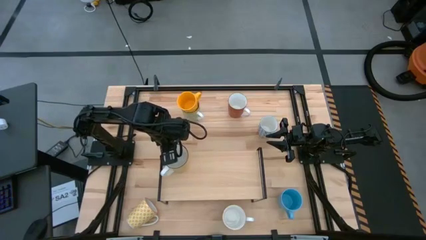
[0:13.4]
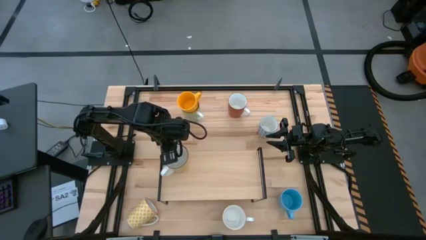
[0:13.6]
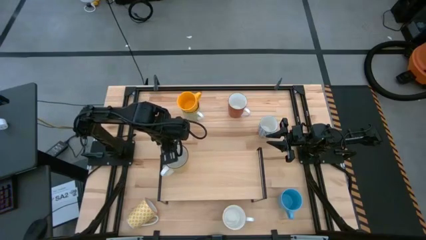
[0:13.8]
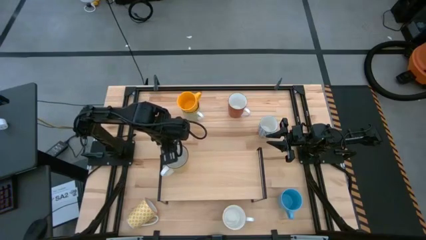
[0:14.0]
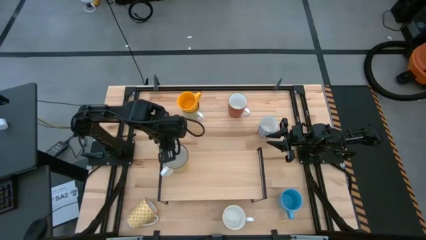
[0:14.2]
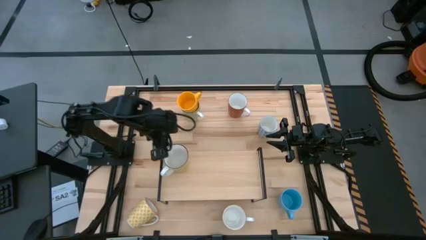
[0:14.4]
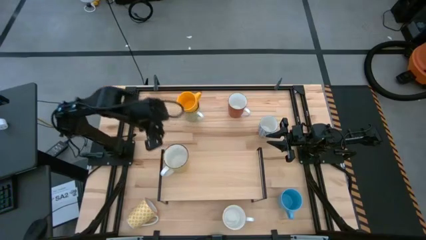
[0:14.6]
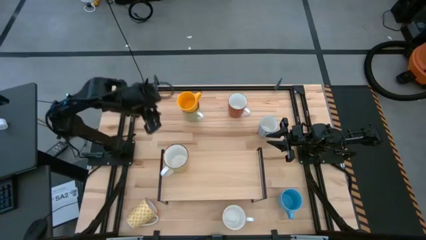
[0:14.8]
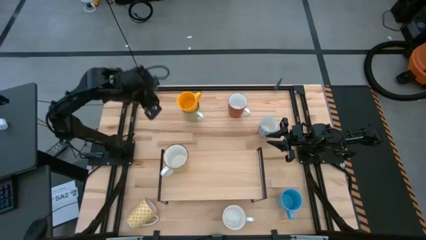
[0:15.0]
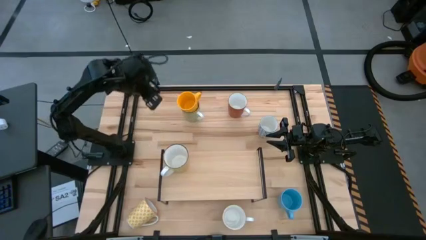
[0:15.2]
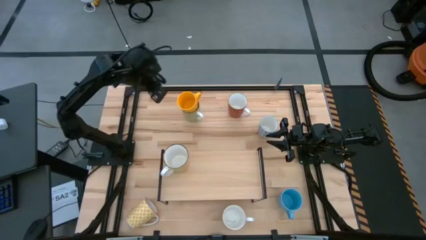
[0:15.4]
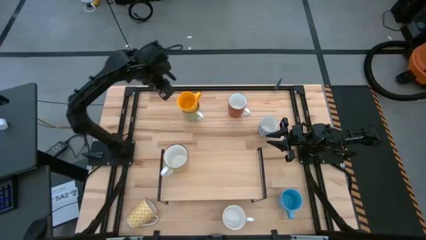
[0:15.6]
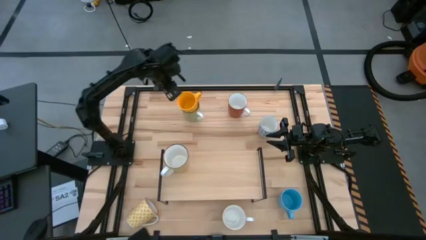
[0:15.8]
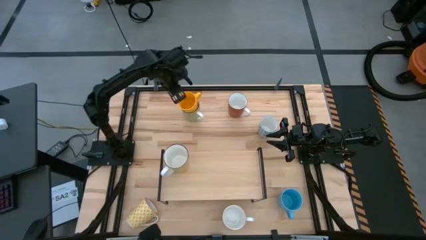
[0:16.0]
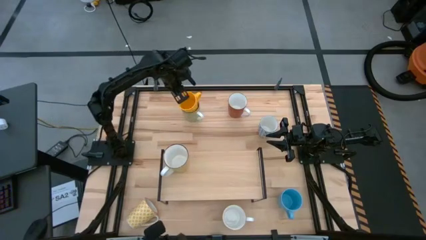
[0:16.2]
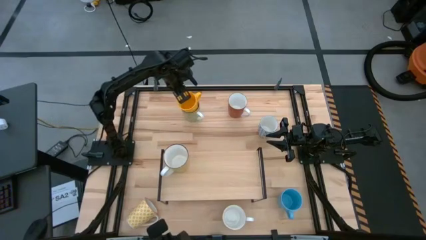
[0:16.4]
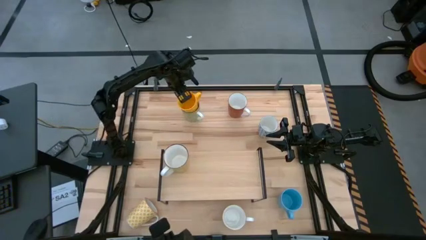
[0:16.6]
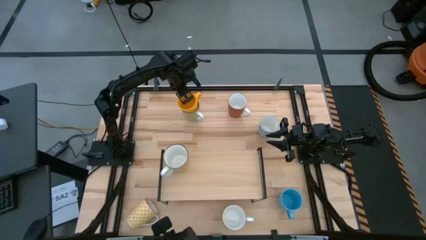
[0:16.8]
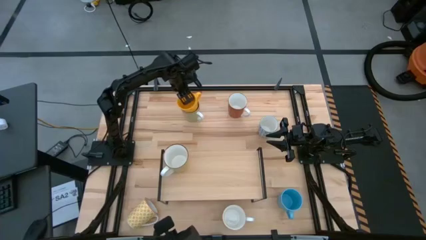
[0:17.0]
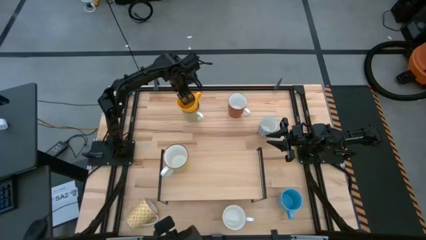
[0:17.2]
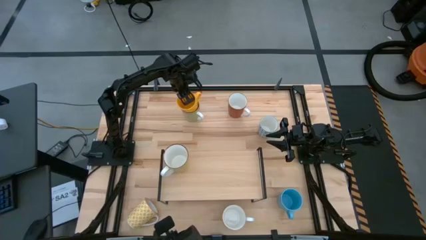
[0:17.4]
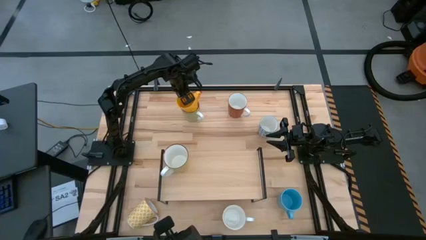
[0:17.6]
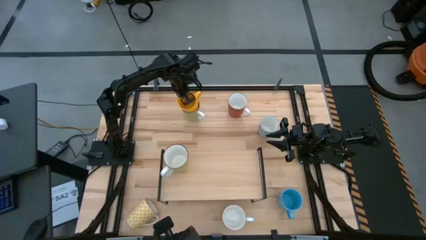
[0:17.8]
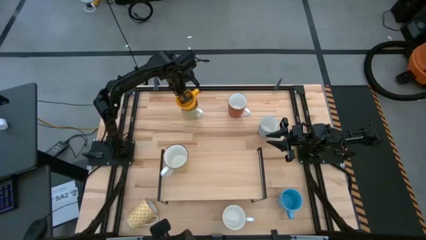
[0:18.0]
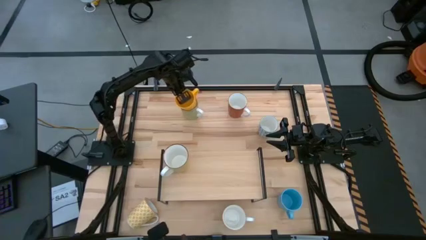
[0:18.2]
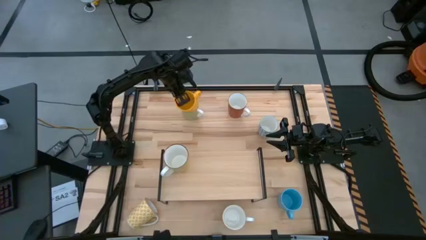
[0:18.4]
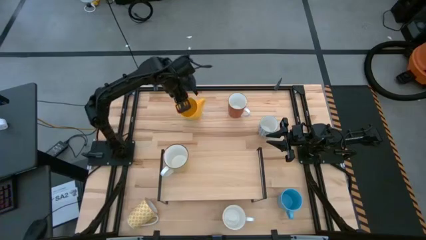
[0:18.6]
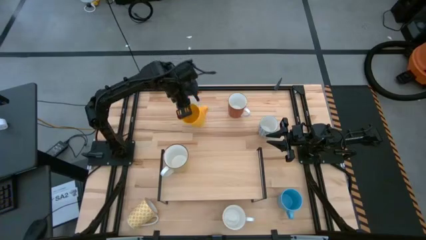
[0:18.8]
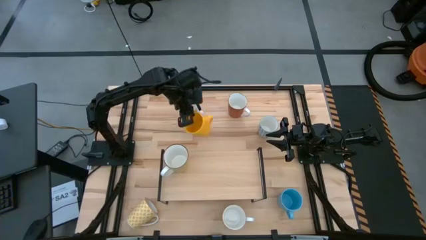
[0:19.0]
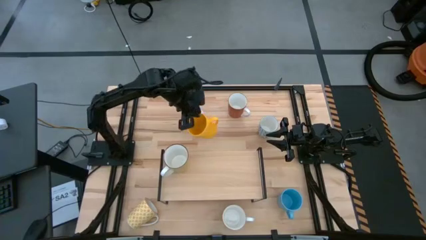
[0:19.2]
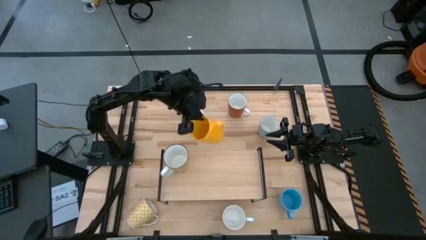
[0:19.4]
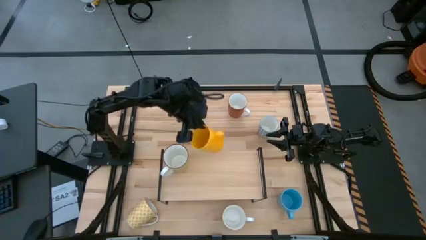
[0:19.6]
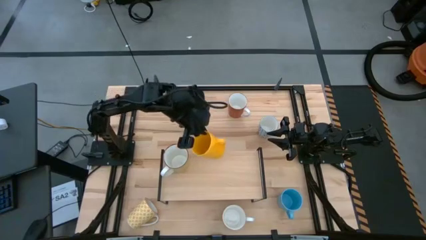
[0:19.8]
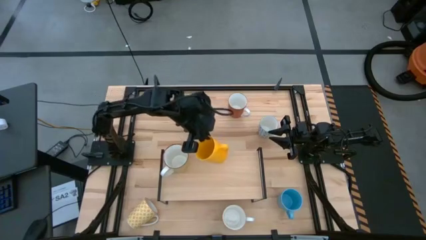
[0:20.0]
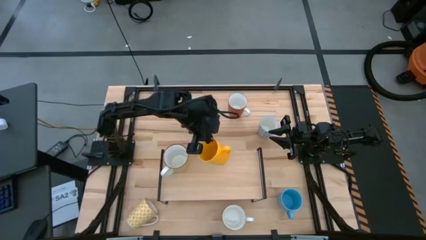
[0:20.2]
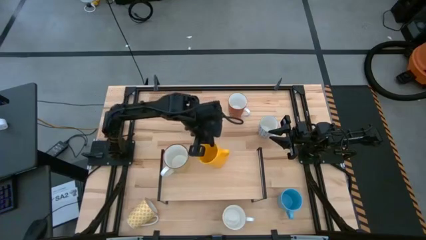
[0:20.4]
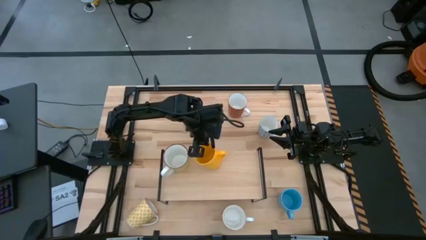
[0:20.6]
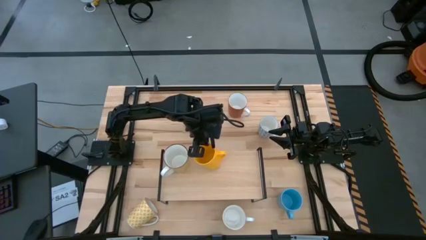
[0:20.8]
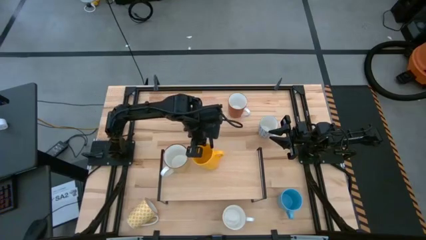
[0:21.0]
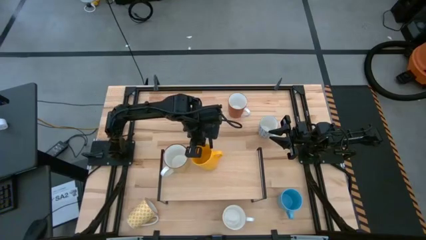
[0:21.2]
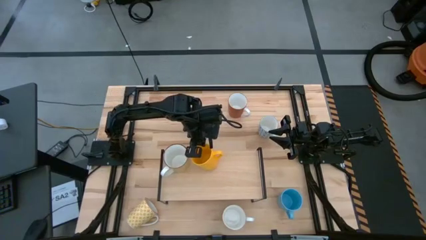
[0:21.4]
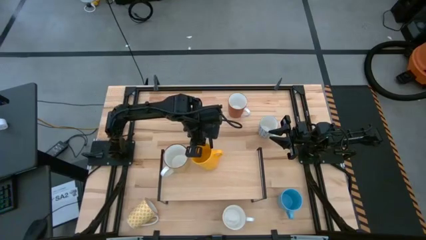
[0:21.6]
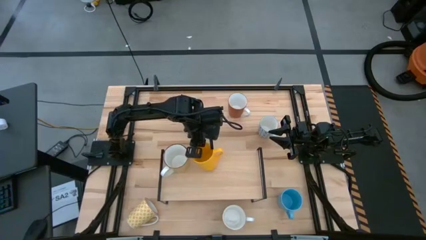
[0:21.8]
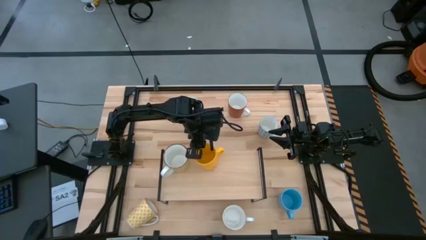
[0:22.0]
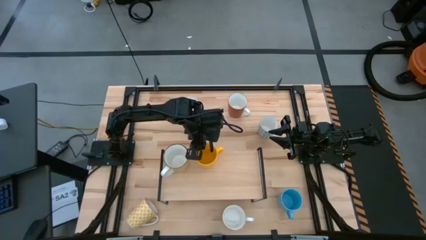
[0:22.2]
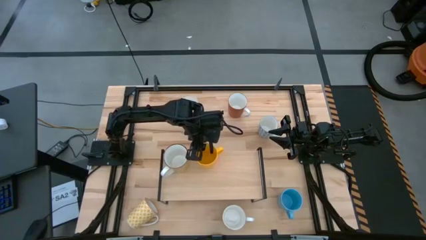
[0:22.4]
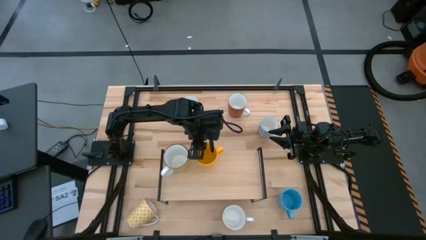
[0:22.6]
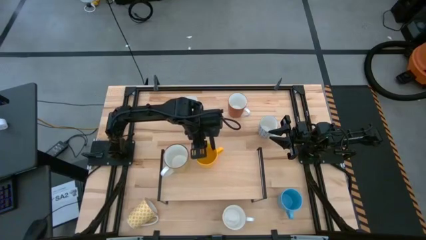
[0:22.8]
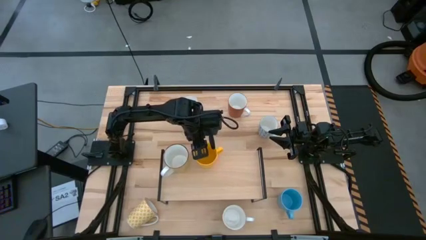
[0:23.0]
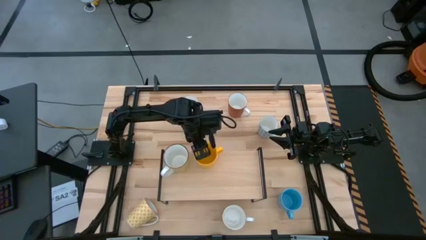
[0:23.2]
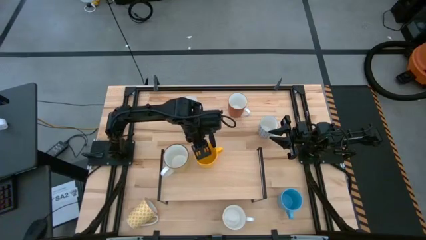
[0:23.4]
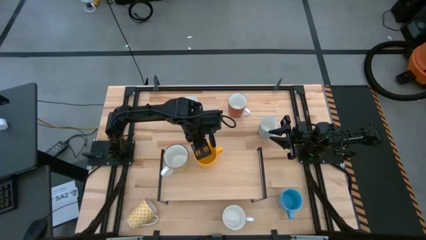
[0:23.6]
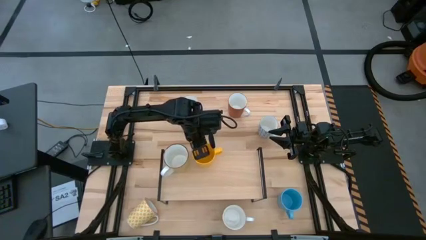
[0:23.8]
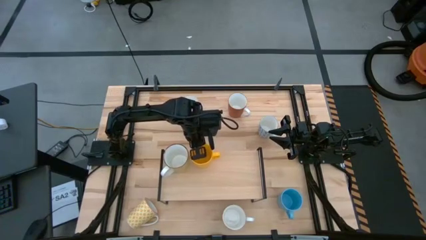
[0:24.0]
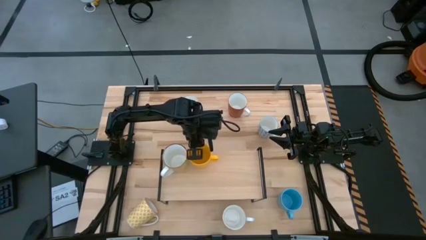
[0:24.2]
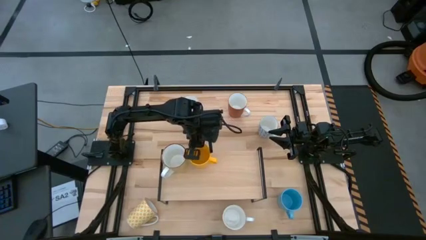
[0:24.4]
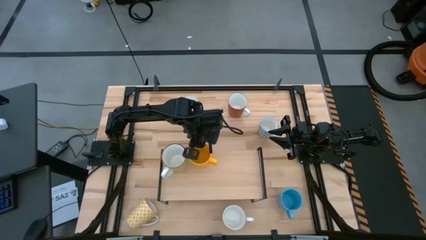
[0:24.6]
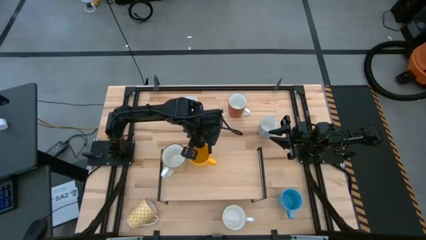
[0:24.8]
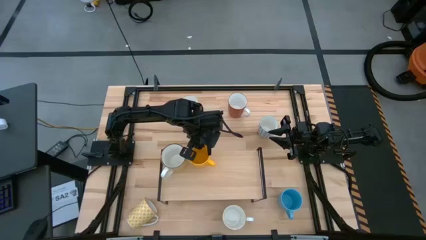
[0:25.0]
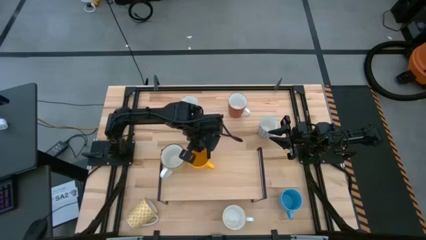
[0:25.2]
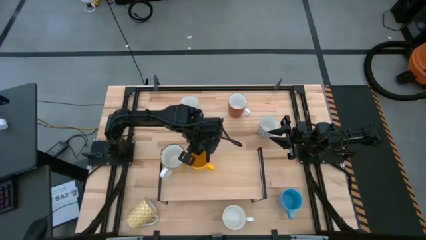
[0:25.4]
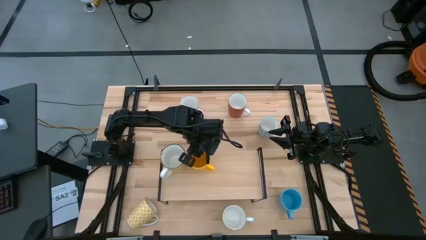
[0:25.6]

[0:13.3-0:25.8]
Task: Place coffee mugs
Put the yellow mug on the shelf

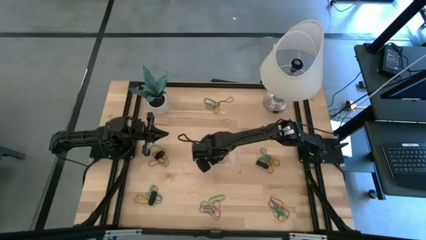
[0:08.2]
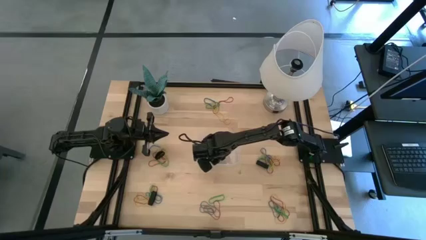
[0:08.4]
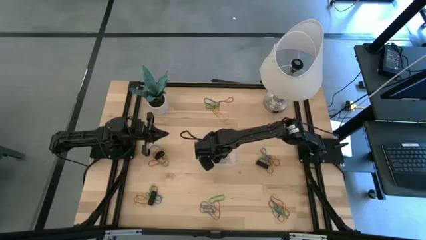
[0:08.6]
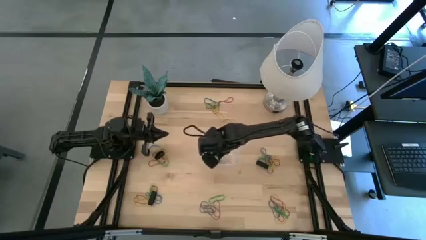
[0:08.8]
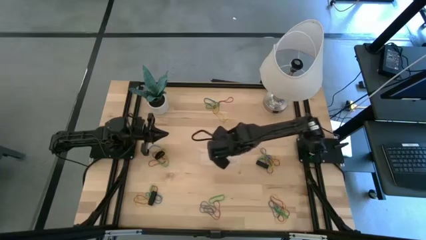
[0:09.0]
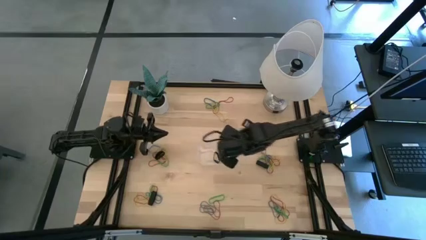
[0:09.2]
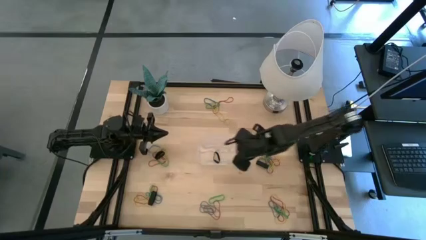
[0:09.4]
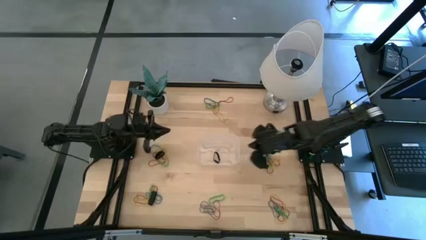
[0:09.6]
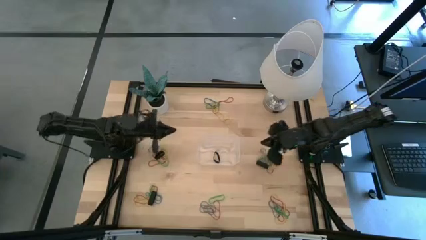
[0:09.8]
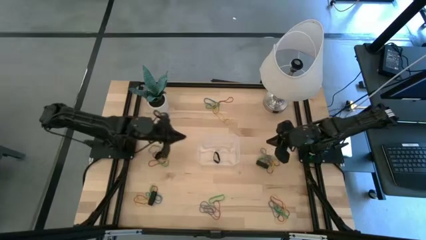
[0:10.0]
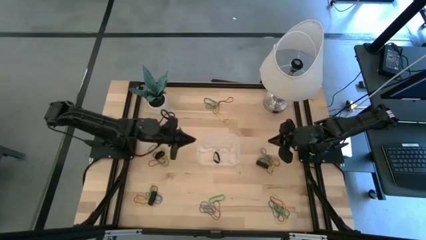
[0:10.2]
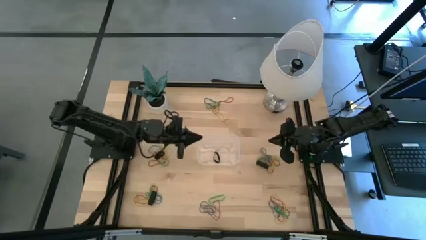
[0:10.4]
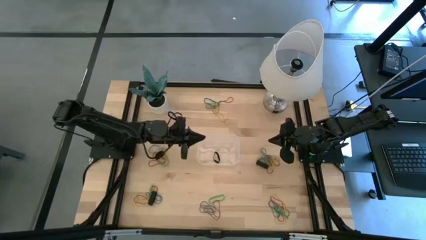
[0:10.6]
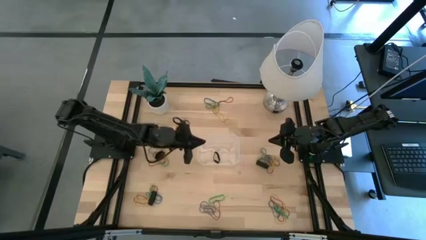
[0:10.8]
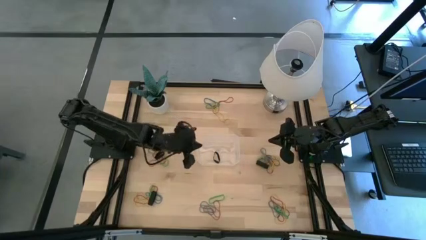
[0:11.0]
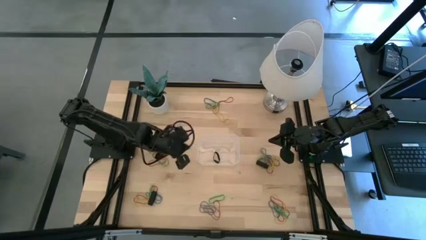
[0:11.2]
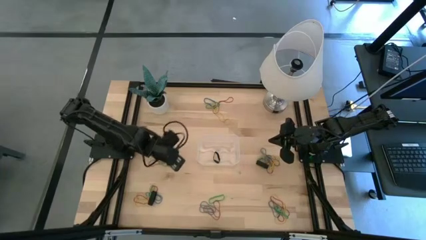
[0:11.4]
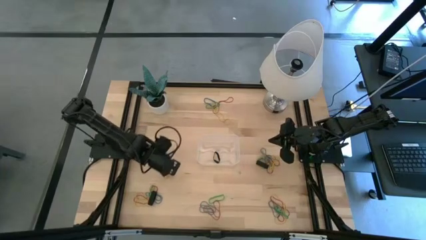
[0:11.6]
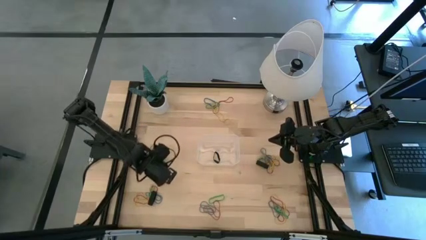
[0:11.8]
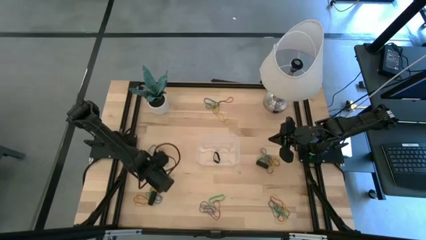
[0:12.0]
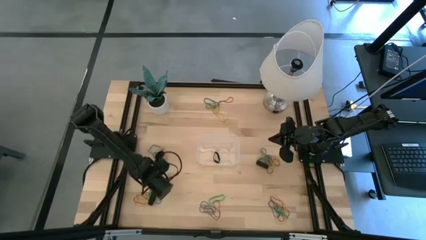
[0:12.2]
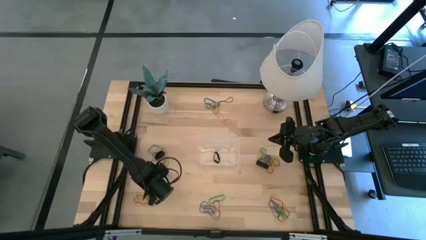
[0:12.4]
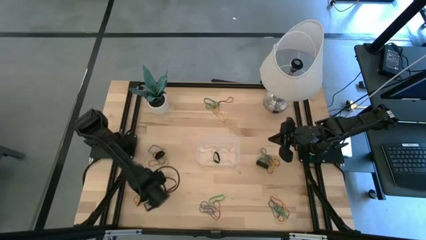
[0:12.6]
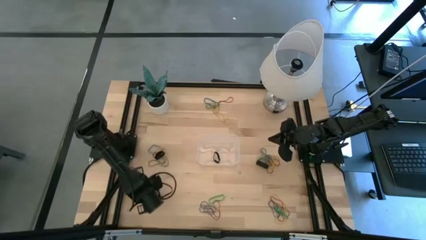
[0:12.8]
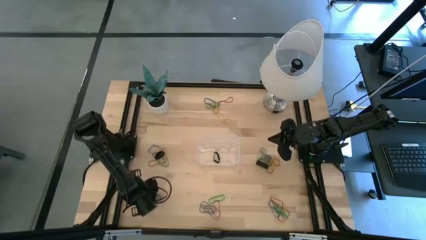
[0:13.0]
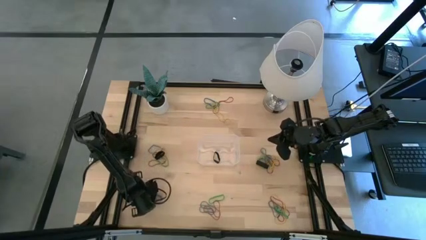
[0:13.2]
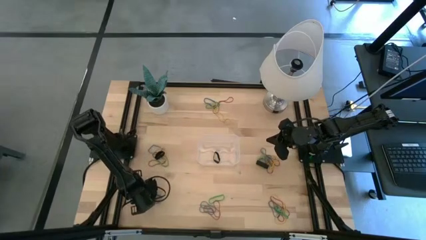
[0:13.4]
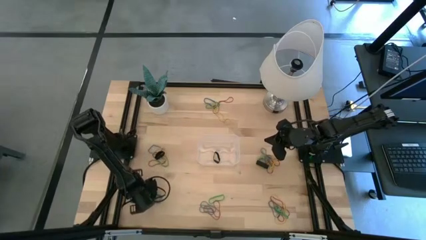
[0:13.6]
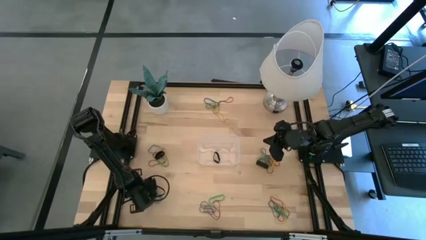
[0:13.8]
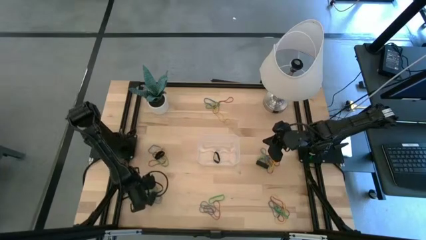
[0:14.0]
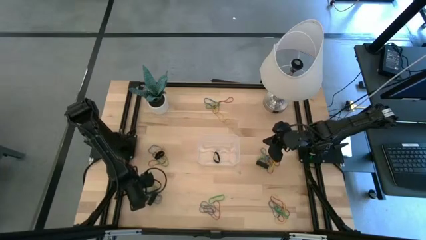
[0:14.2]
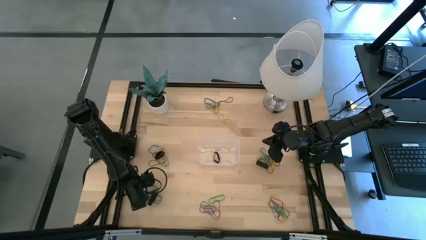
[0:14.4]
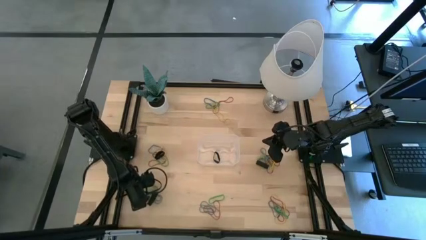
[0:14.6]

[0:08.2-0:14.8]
Task: Pick and place rubber bands into bin
Put the yellow rubber band into the transparent bin
